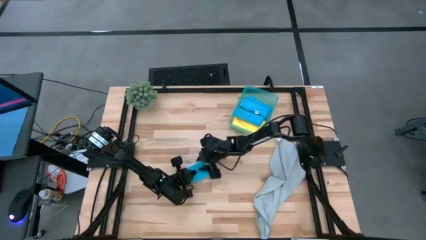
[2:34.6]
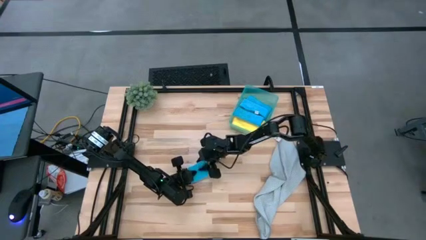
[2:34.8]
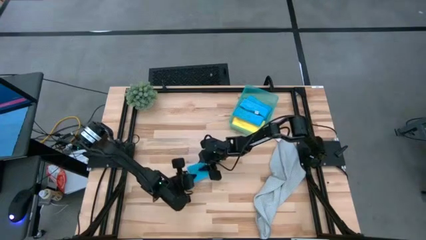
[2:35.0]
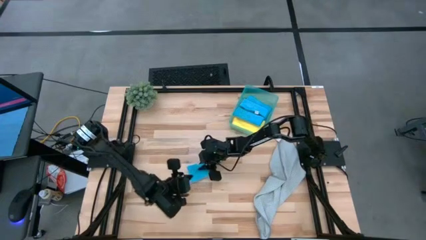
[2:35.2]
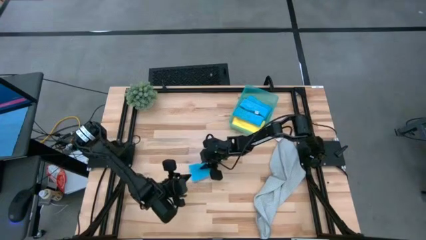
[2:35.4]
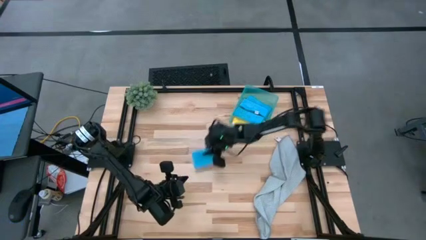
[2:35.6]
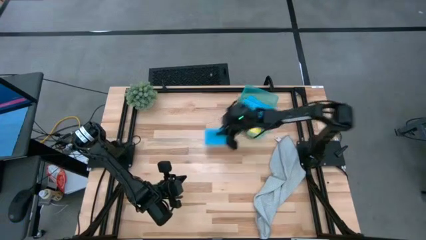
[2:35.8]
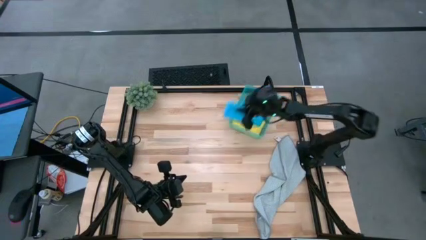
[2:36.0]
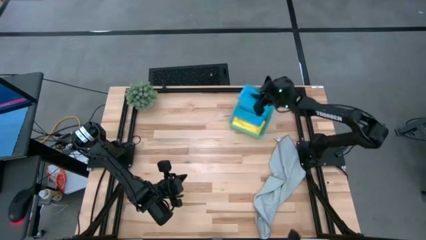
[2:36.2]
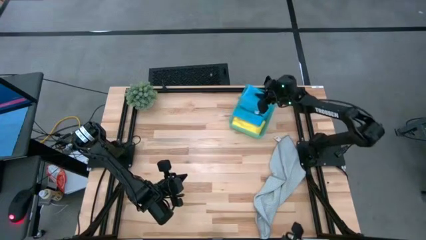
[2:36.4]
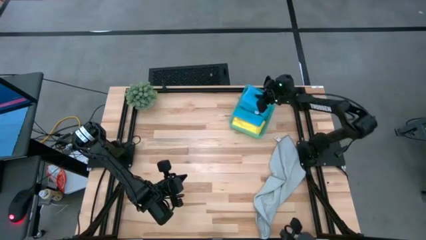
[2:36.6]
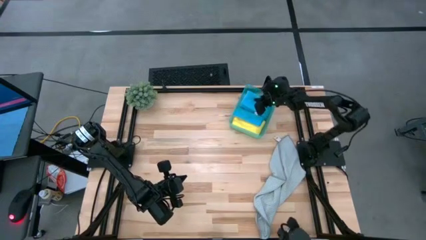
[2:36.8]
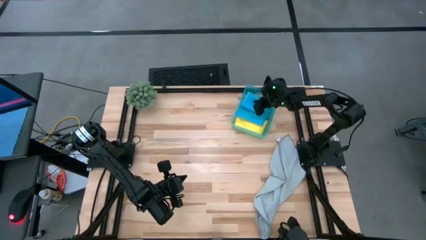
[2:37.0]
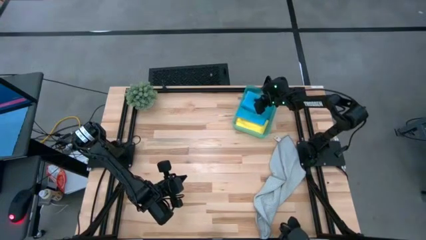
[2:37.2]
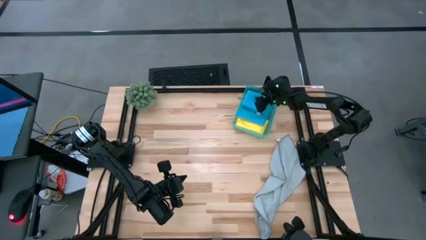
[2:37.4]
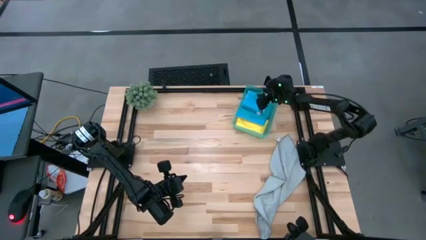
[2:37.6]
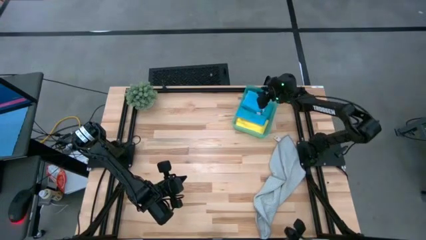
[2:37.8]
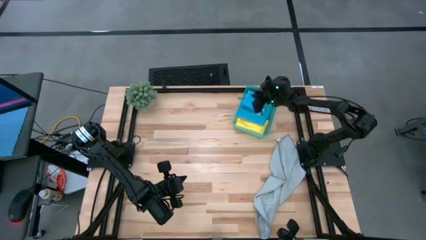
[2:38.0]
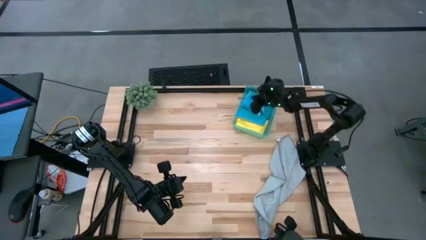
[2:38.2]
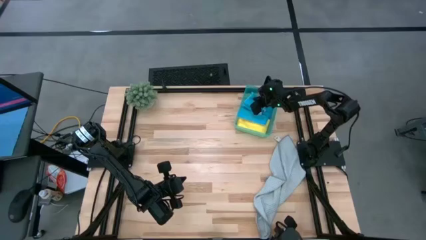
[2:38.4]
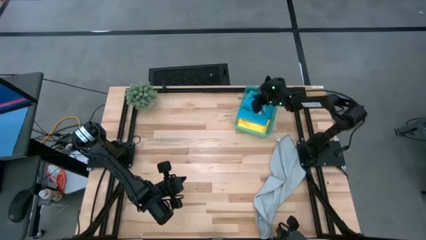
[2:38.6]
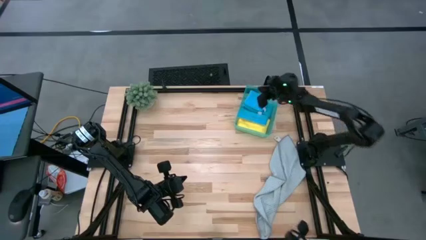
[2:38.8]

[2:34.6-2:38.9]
Task: Fold microfiber towels
Put the blue towel into the blue bin

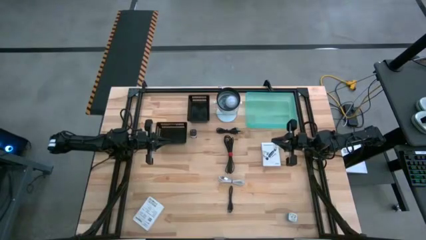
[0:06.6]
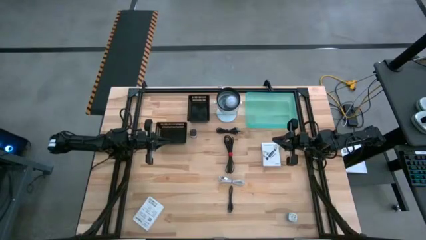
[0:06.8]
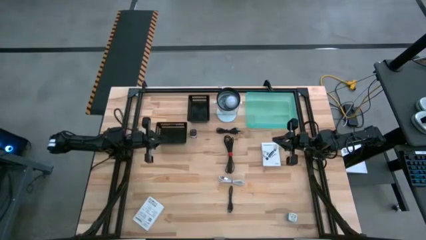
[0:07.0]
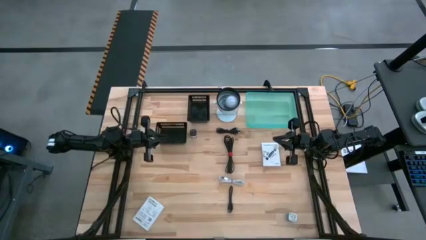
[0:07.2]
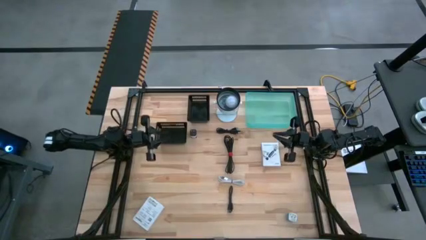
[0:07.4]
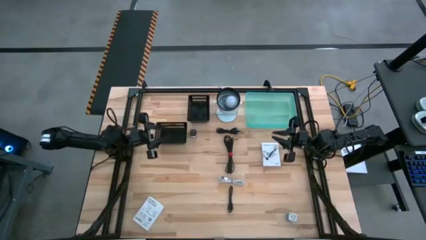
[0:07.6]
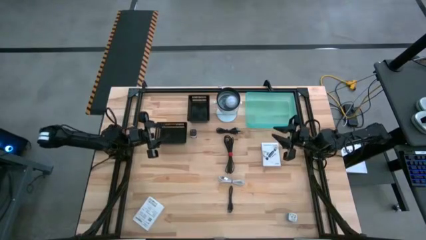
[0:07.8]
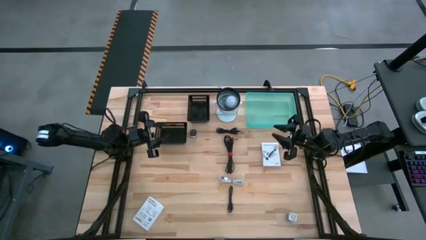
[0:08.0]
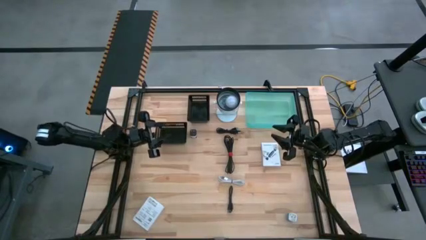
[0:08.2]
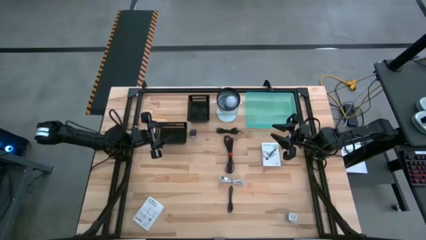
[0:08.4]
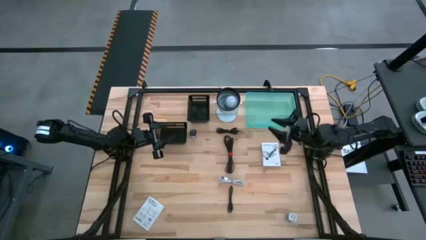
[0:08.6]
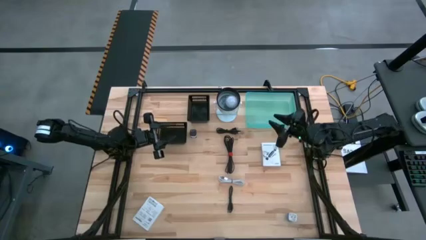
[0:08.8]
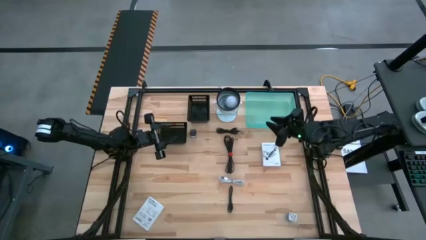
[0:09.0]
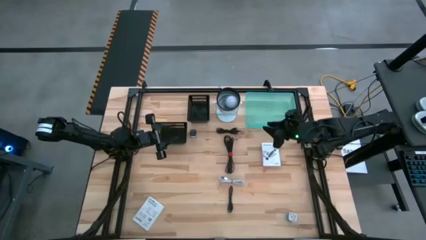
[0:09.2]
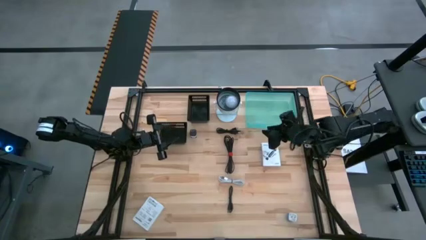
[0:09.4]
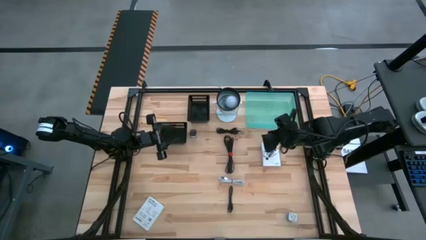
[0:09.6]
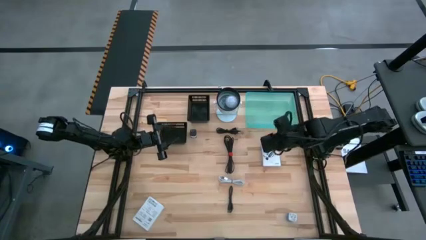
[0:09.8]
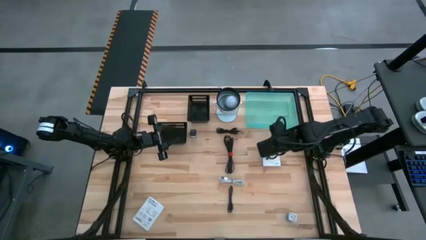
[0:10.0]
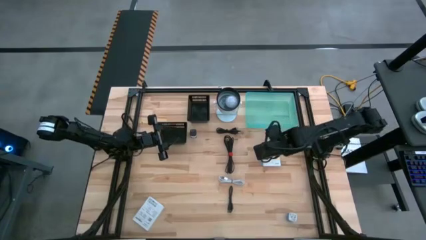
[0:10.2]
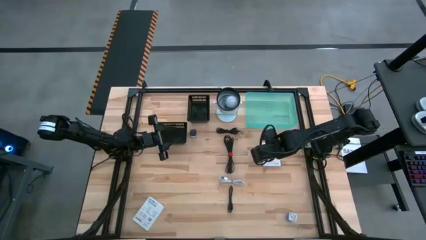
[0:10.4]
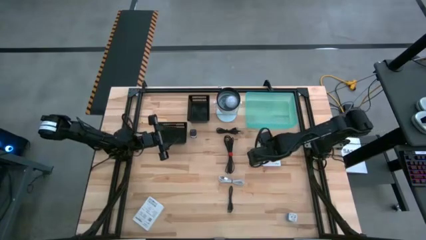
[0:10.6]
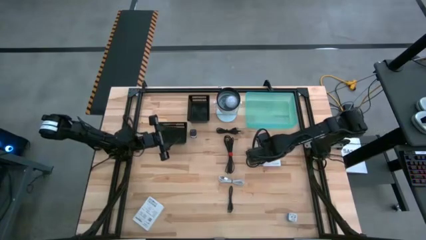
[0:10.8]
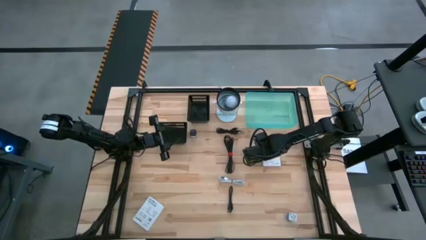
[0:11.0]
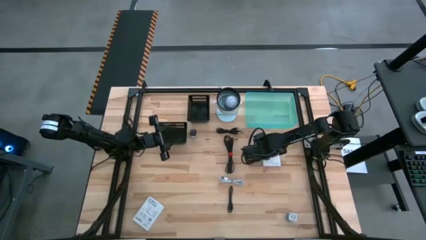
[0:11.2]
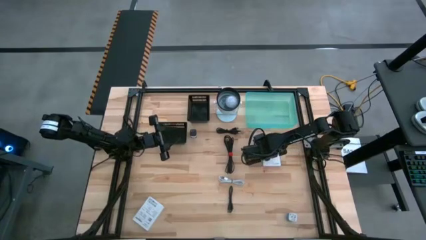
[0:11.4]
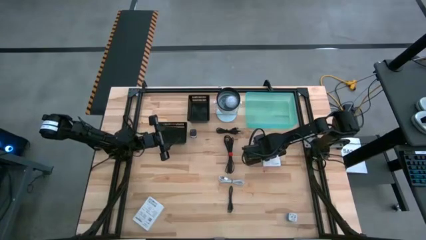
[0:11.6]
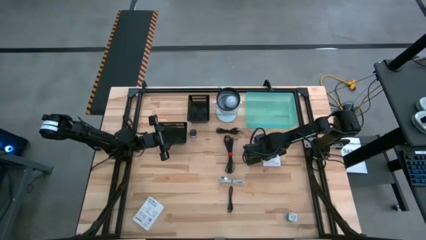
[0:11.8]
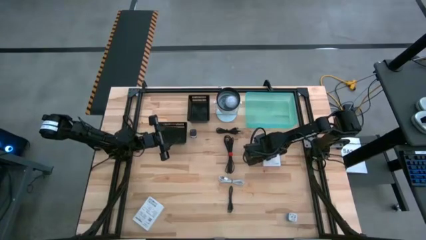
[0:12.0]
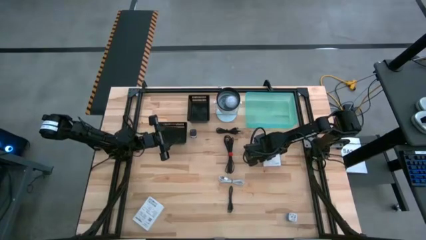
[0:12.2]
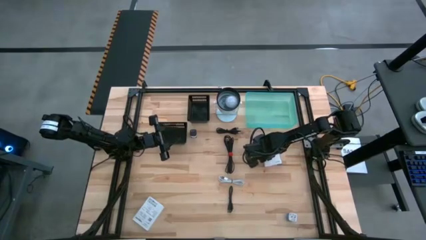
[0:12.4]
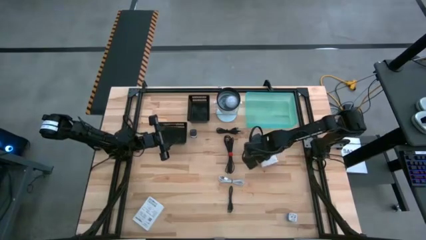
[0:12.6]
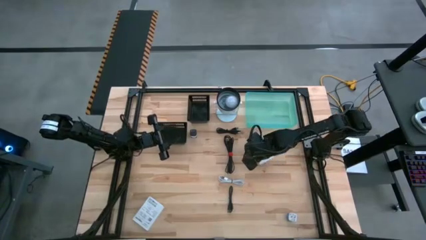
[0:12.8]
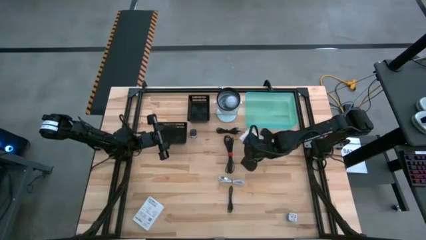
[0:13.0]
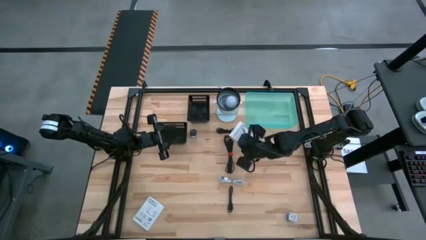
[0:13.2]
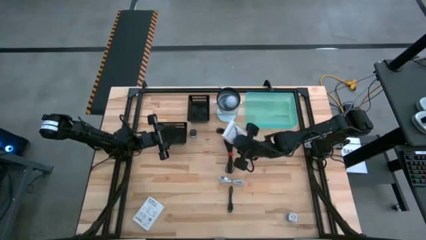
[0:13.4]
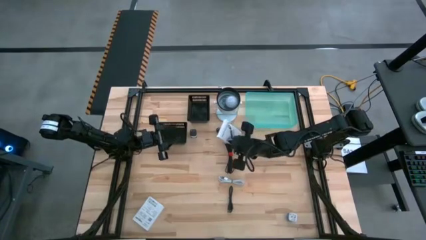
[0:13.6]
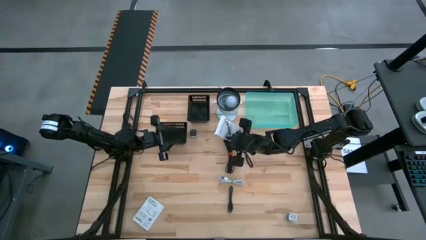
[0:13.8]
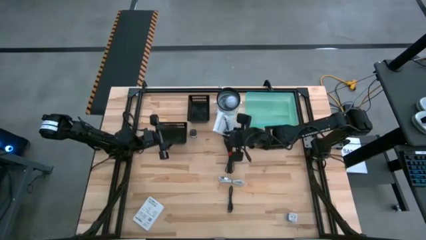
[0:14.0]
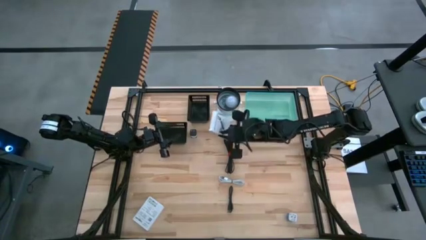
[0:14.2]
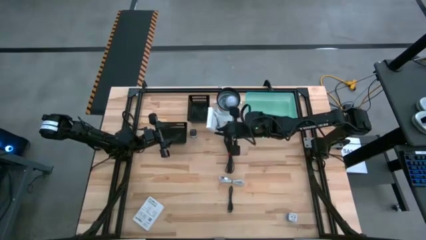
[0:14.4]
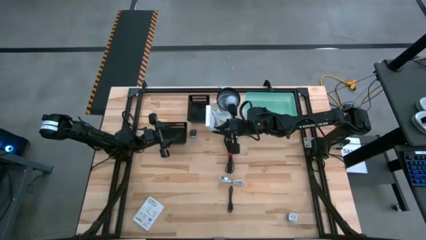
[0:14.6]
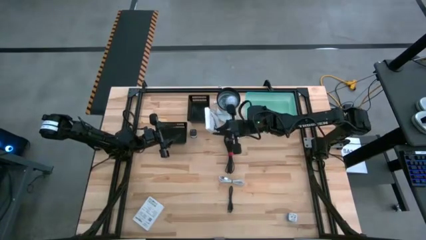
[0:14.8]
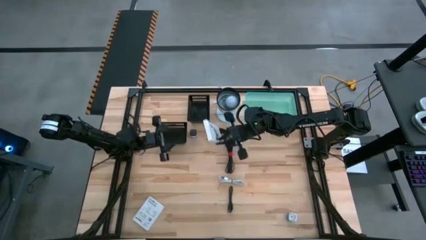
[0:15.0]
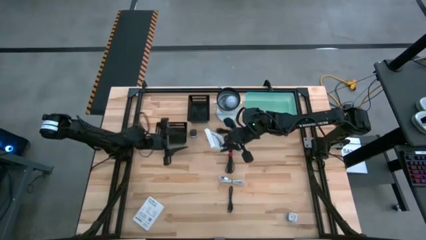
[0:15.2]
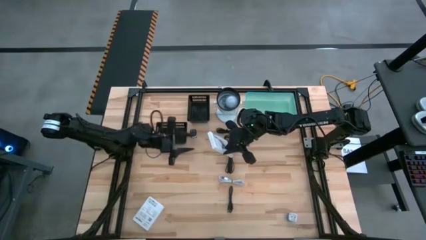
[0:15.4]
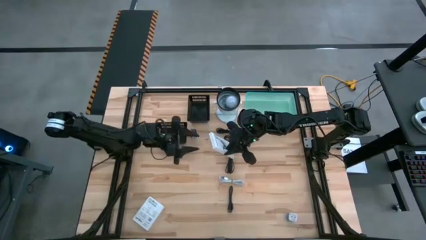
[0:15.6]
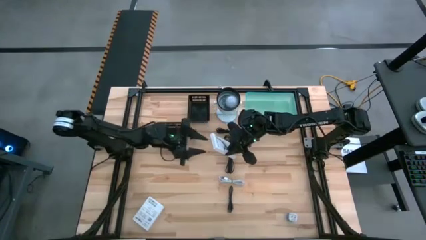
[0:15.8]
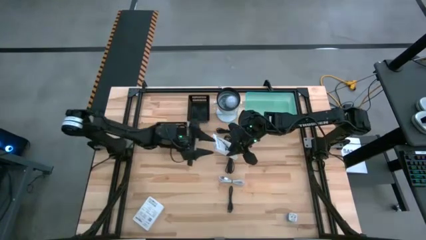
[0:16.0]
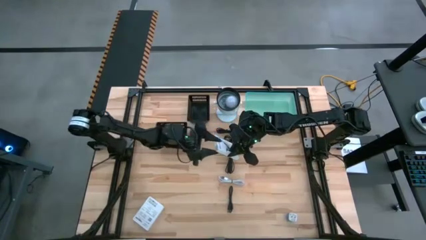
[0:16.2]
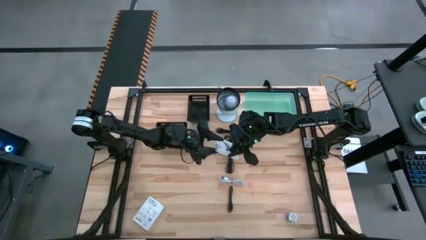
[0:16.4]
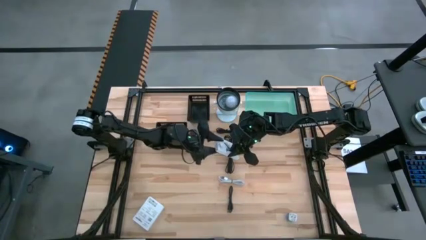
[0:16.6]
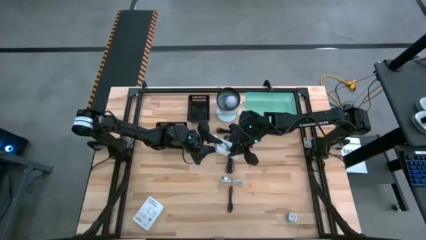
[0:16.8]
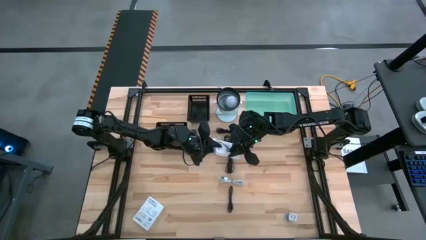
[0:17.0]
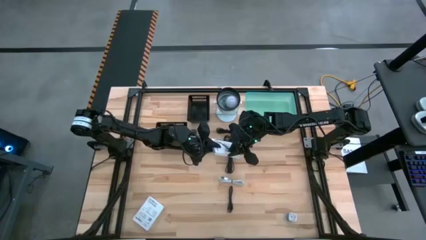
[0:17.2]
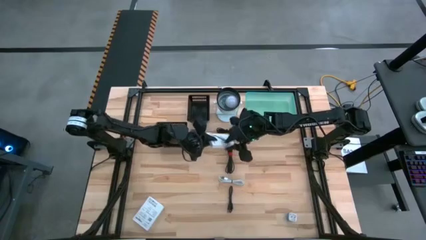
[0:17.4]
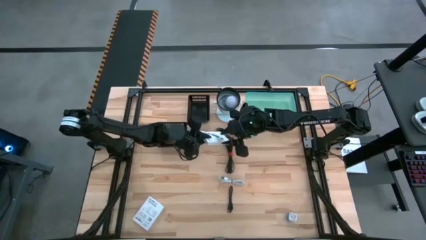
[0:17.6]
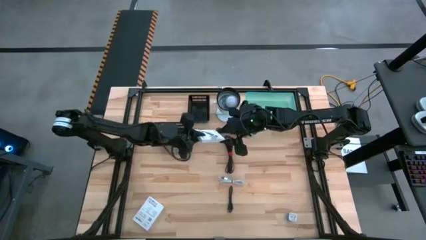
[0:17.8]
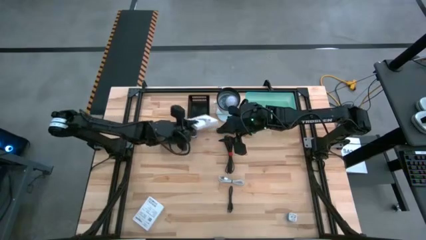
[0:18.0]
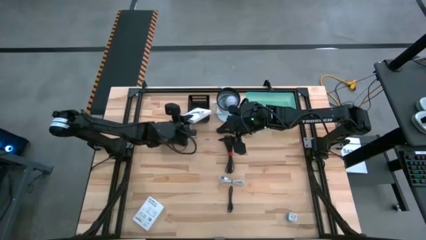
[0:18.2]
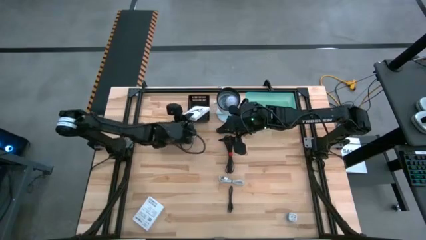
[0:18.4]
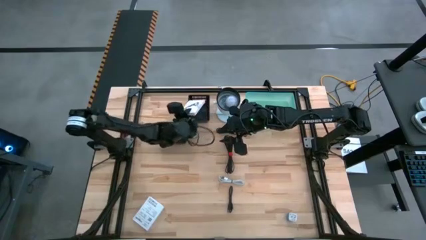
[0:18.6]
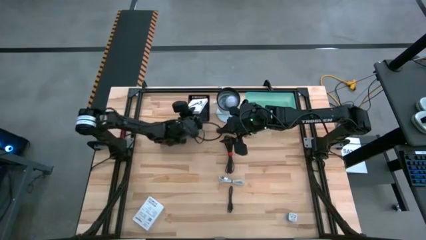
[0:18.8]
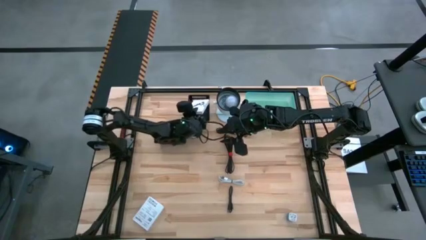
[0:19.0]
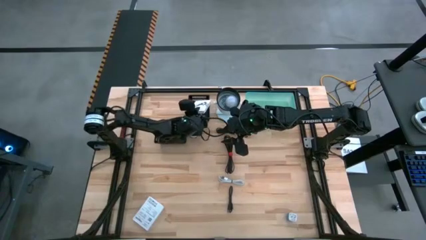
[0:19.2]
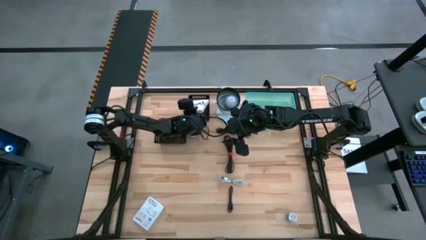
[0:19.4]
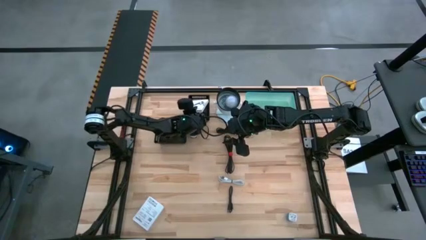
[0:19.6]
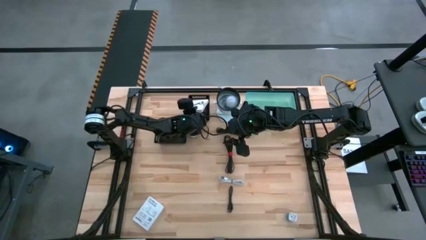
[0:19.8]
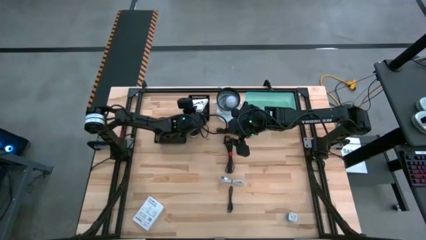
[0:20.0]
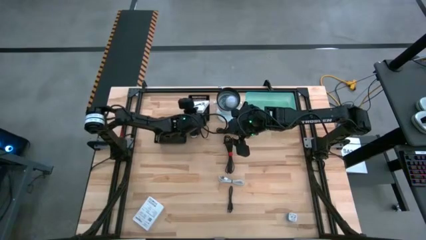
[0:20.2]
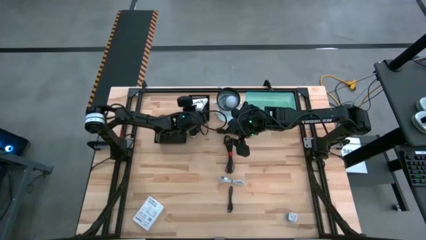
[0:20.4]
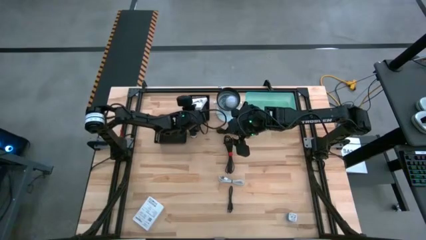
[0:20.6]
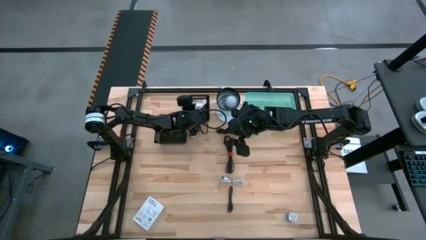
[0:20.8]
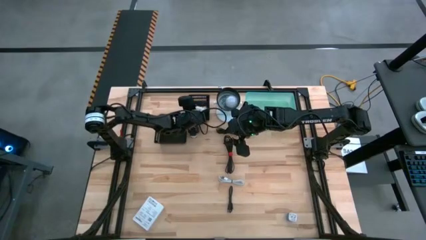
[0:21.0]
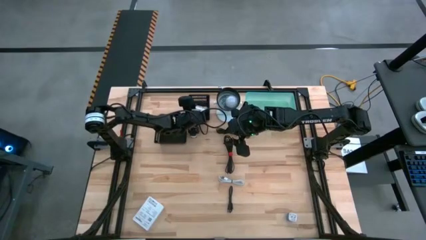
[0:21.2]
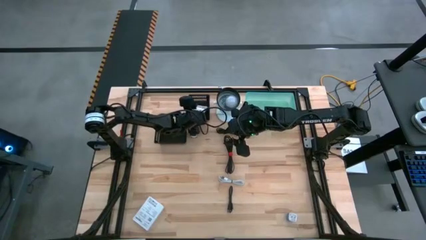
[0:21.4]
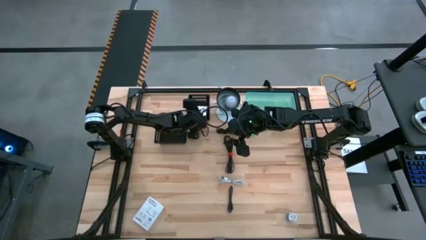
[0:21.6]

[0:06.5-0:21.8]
Task: Pick and place items into bin
Put the right white box into the top black bin
